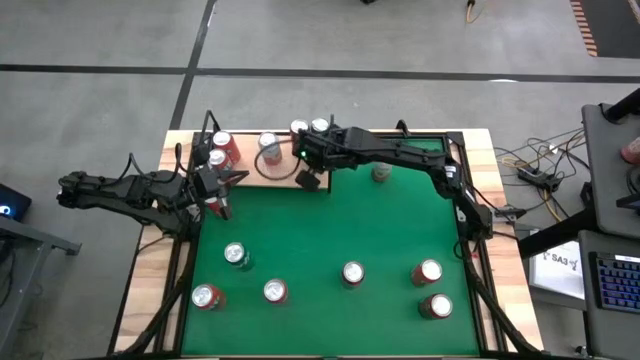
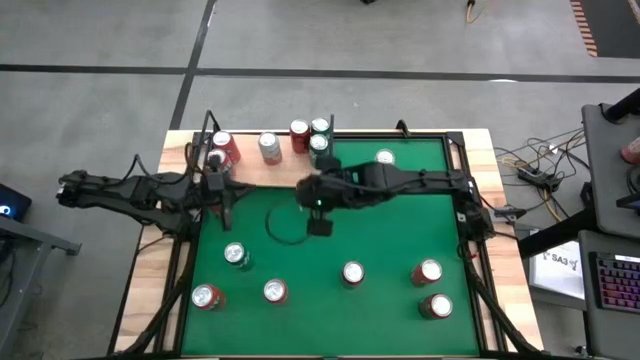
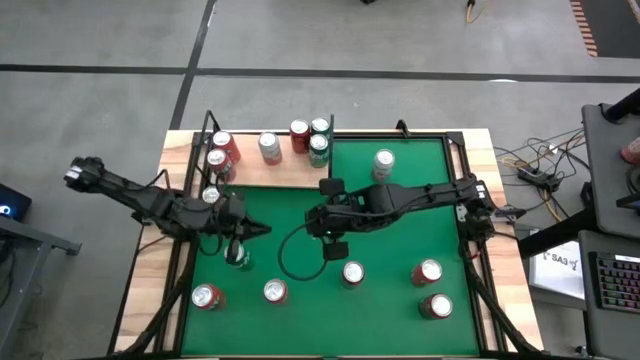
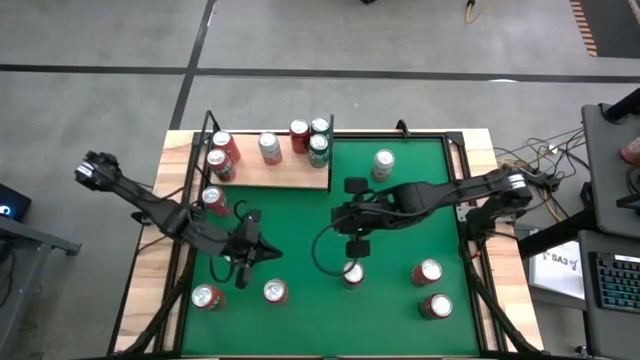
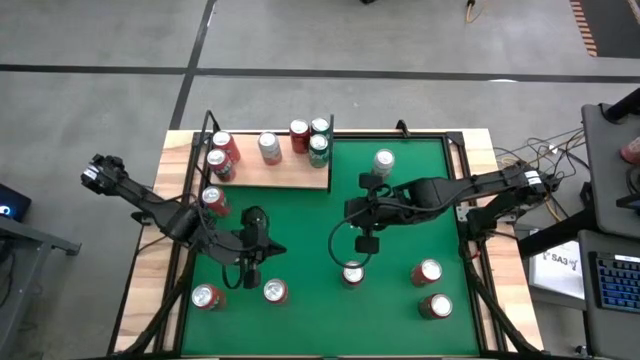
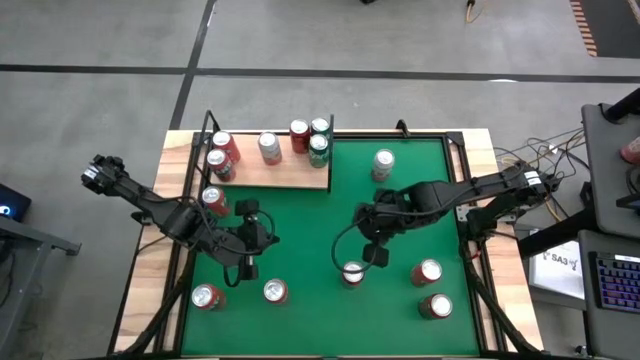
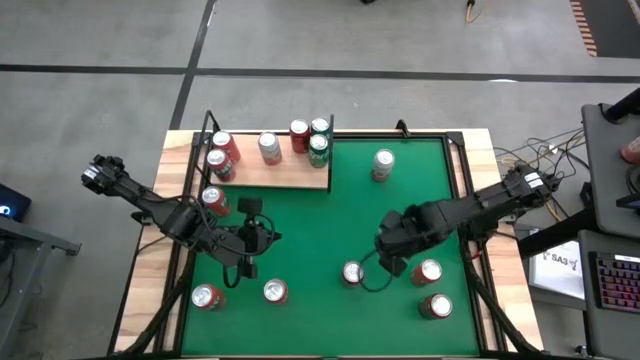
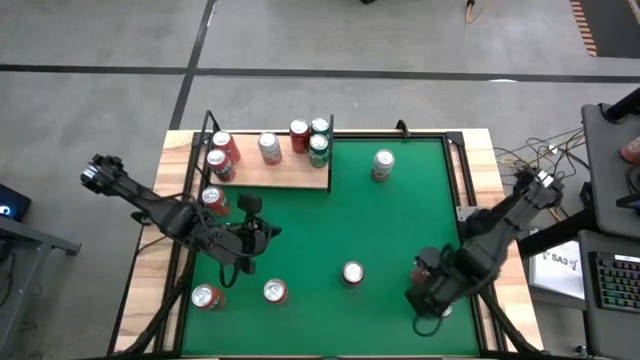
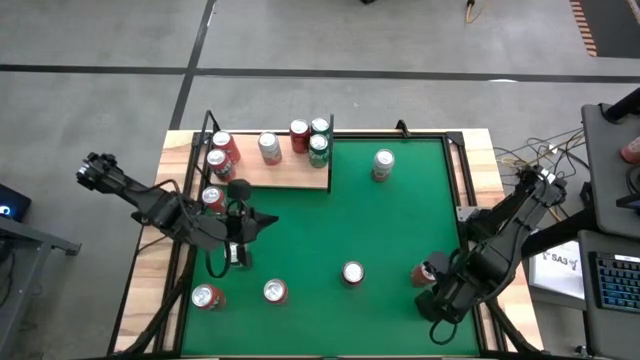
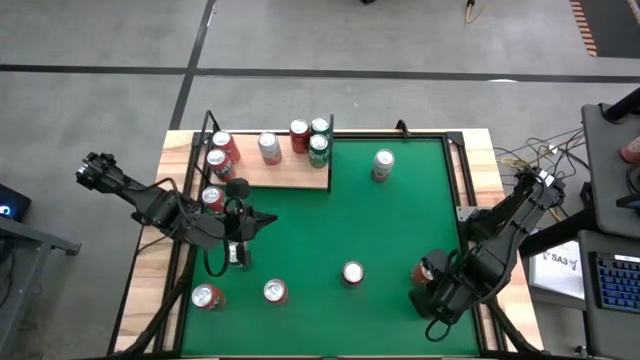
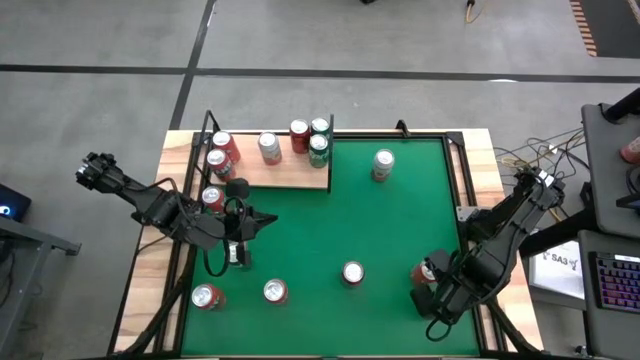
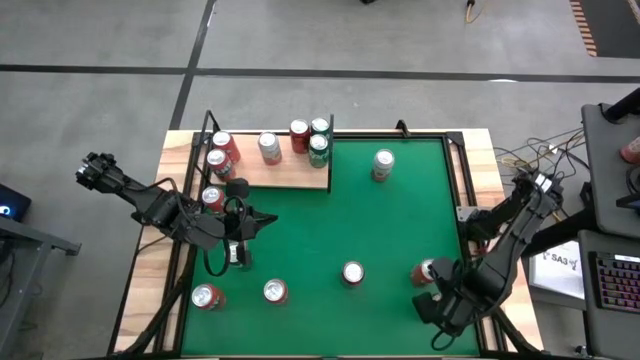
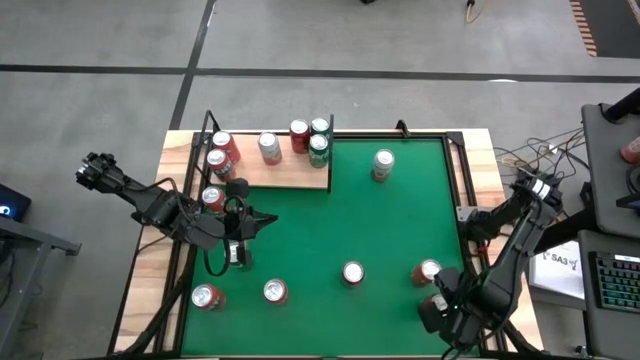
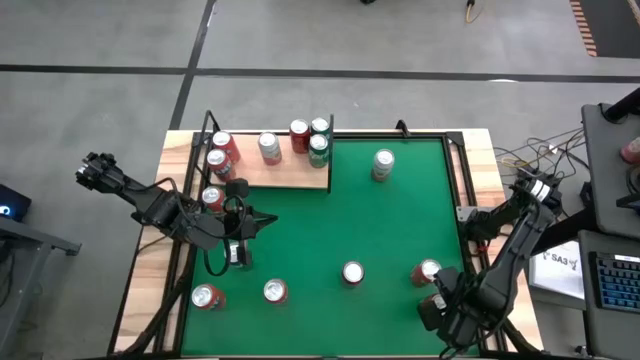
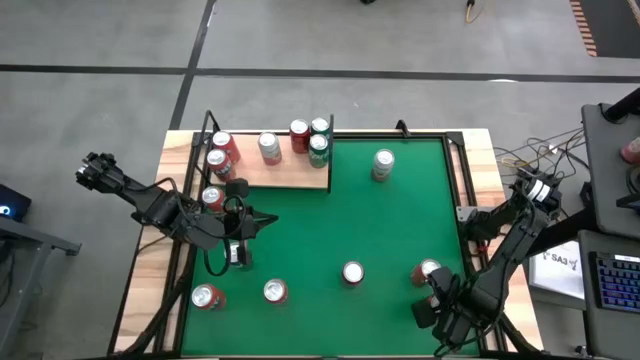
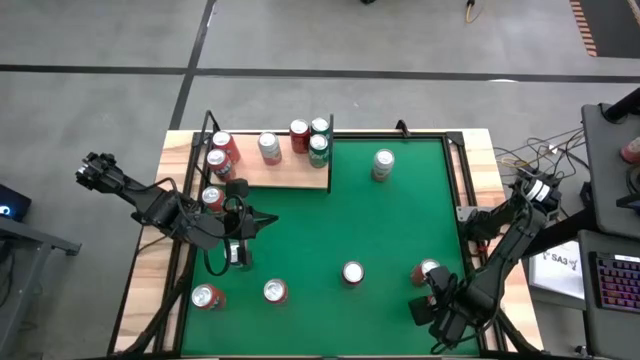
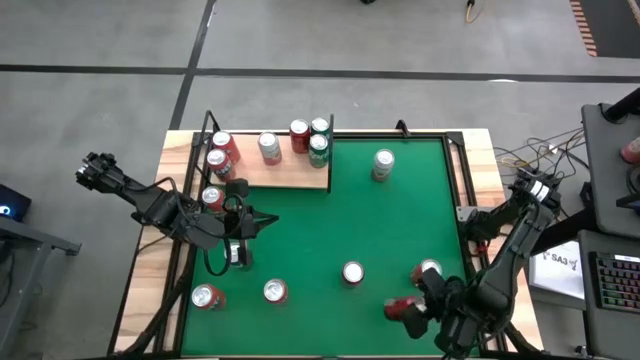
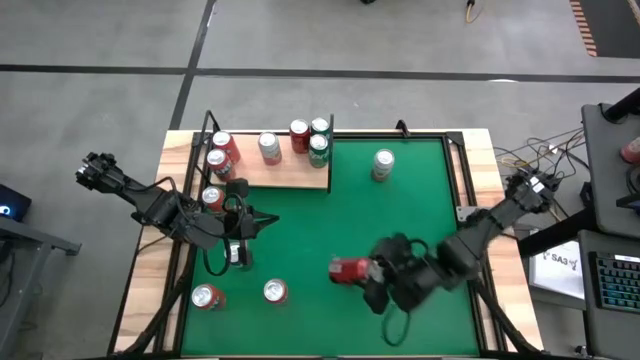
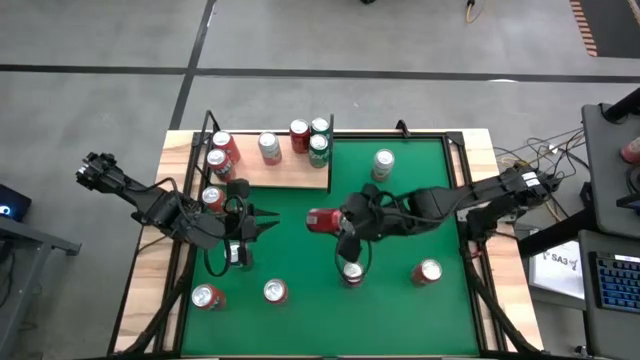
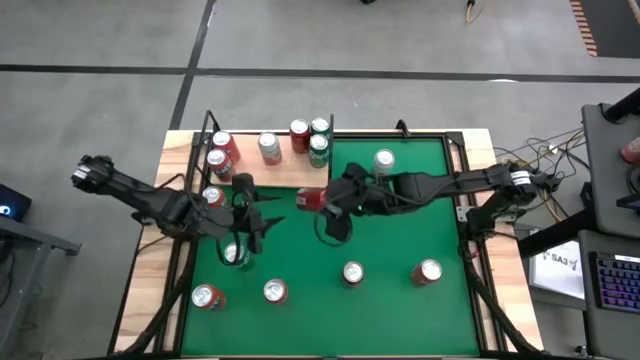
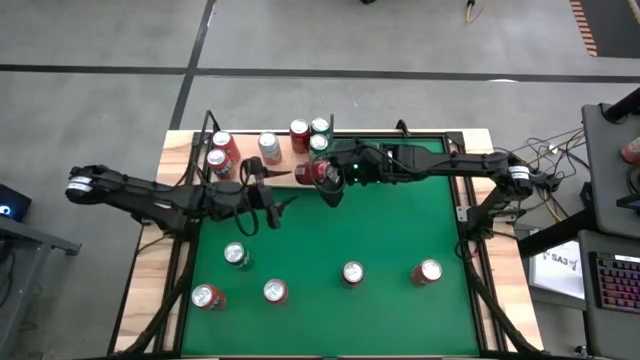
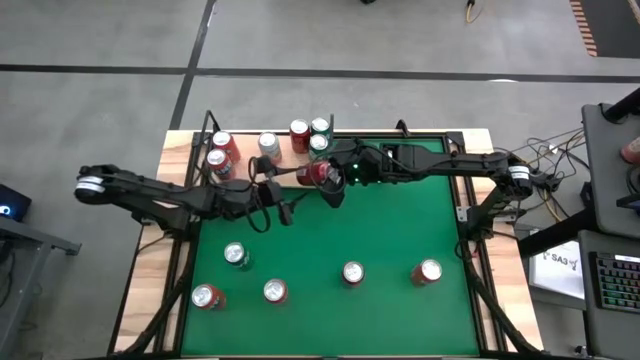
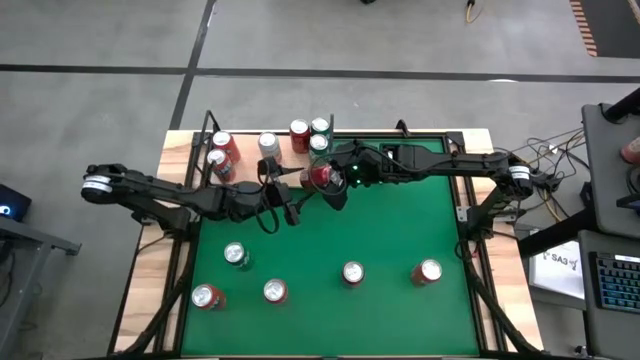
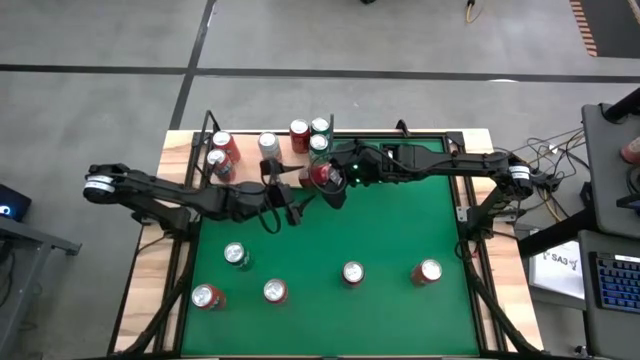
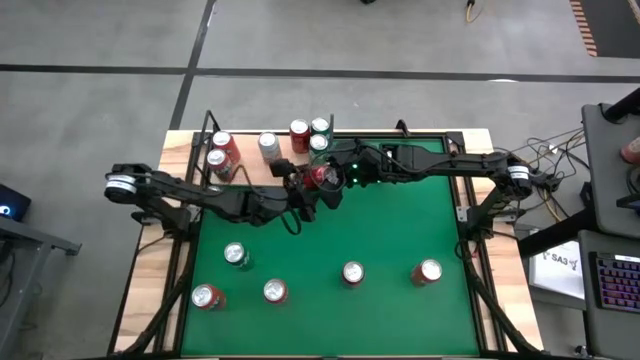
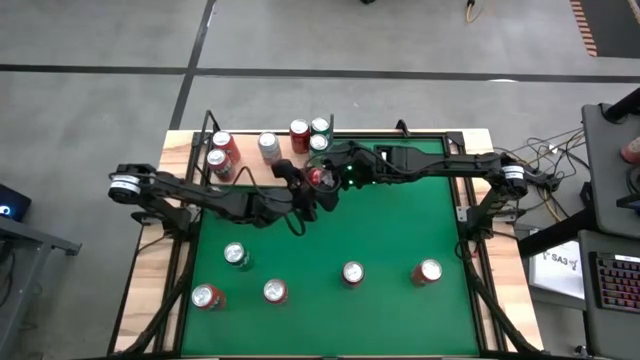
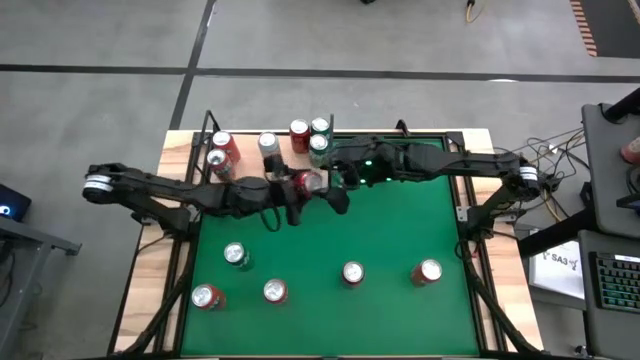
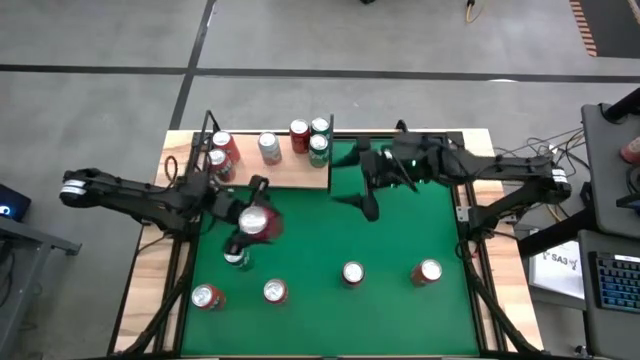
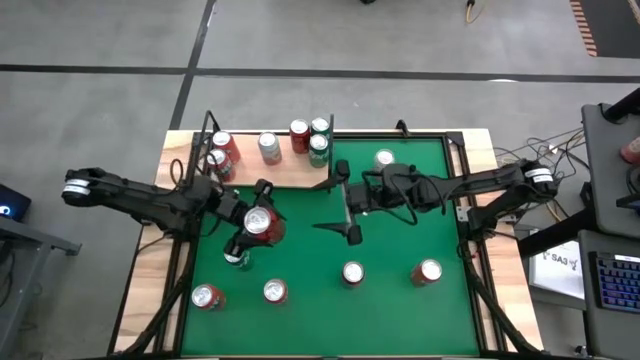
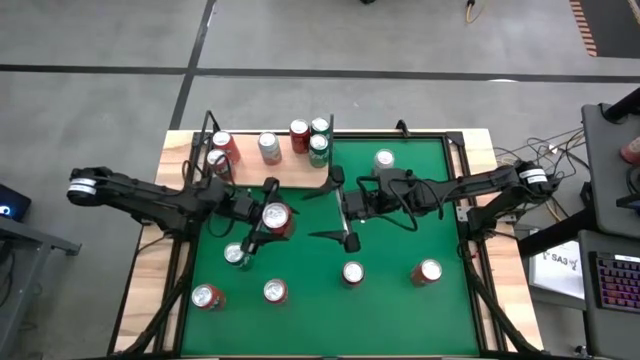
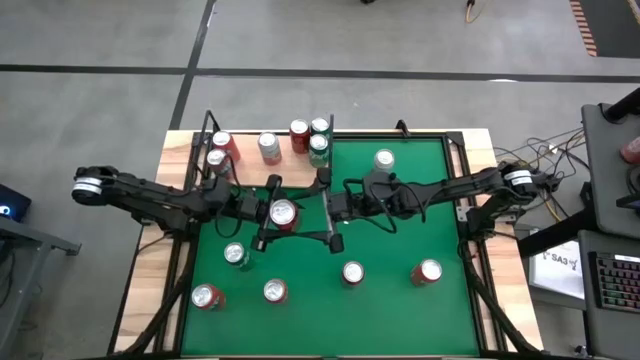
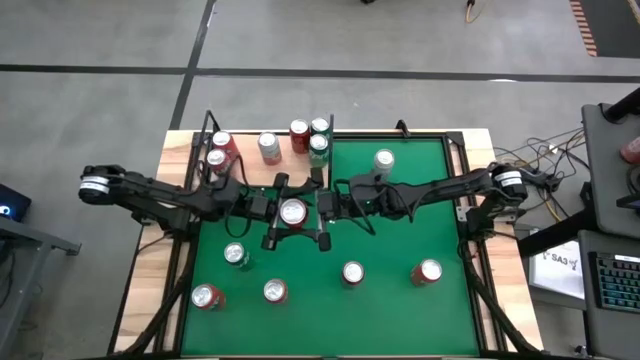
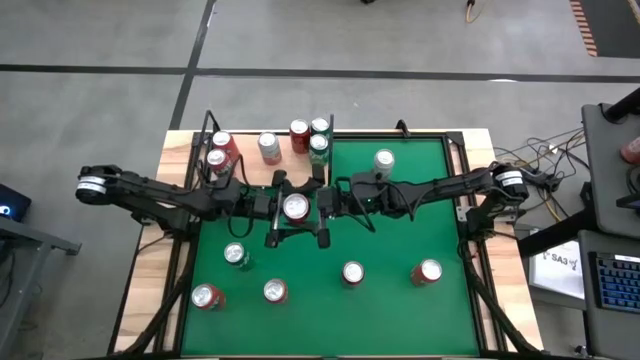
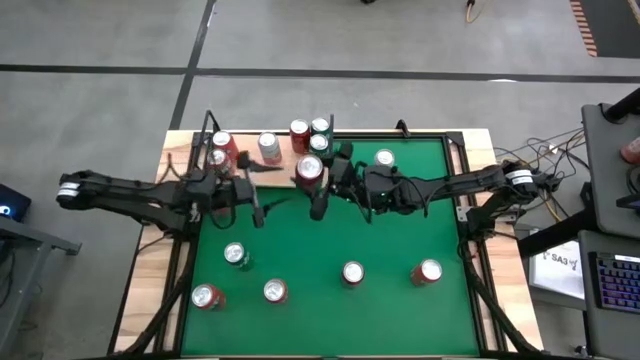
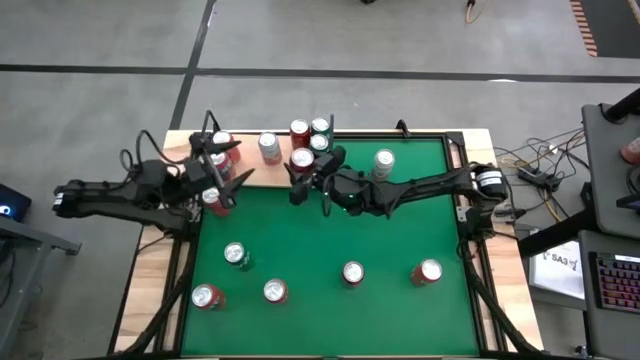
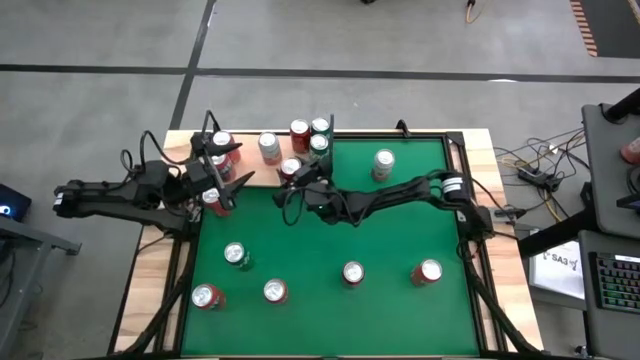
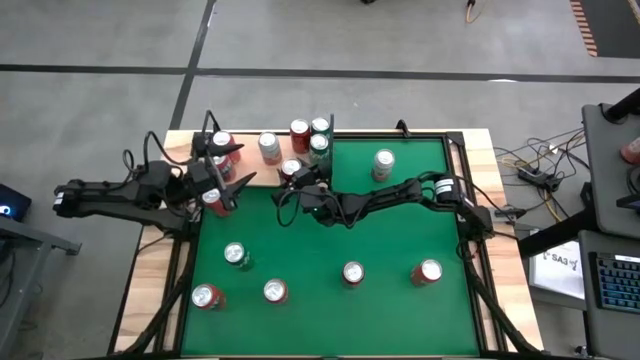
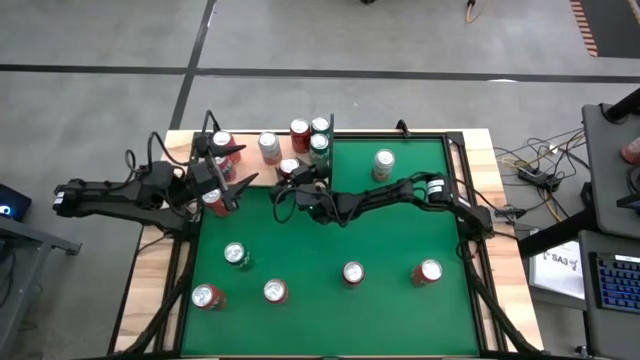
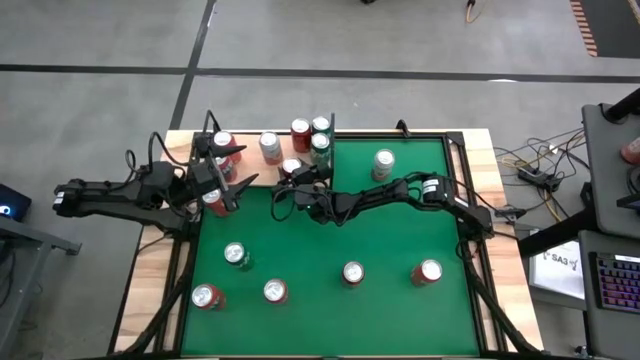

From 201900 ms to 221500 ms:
Task: Place canned beverage on shelf
Put the red-black soda can on the shelf aligned with the other red-black soda can

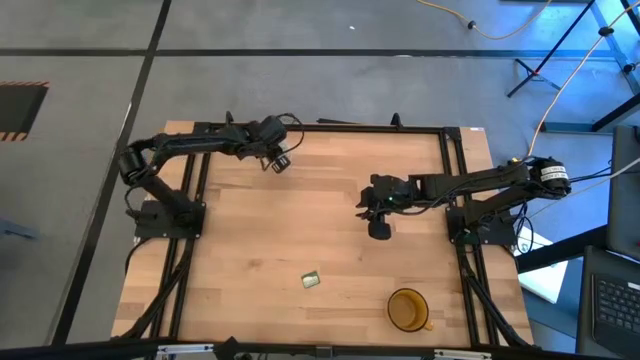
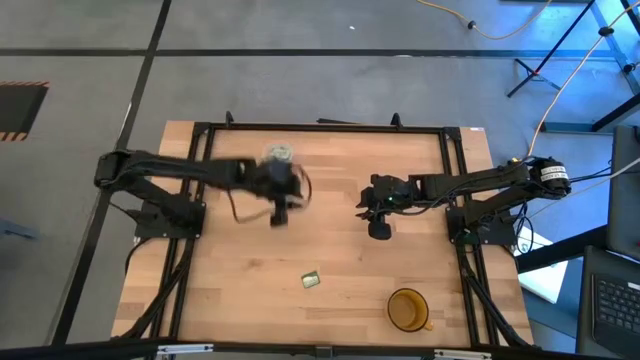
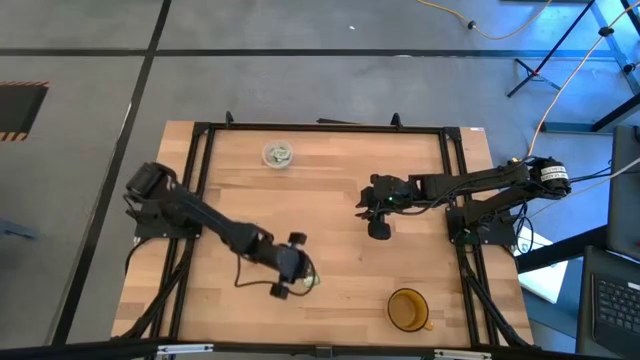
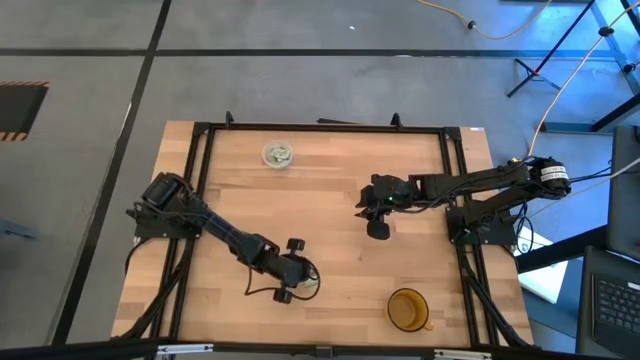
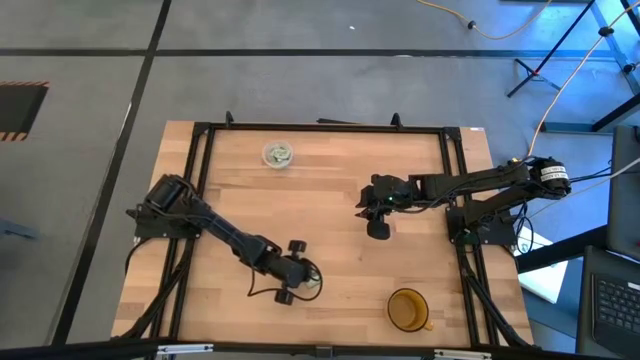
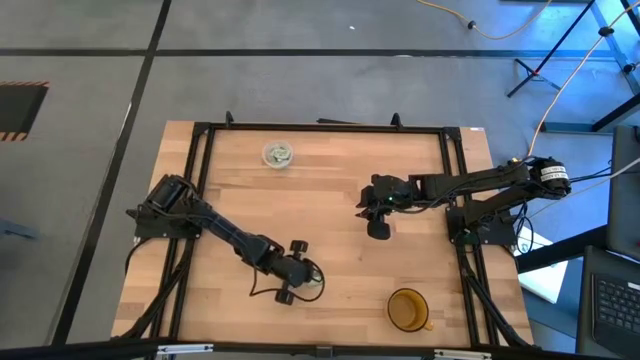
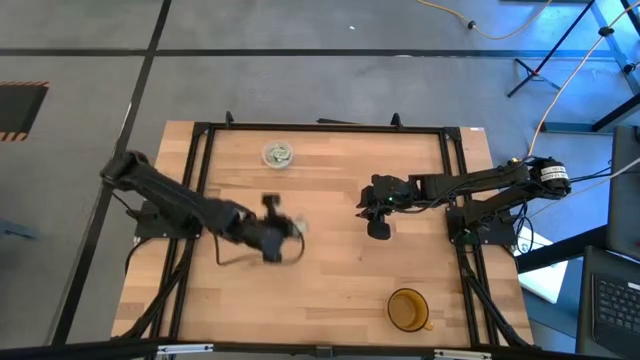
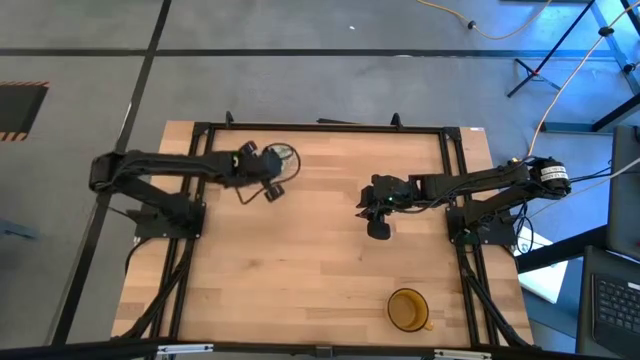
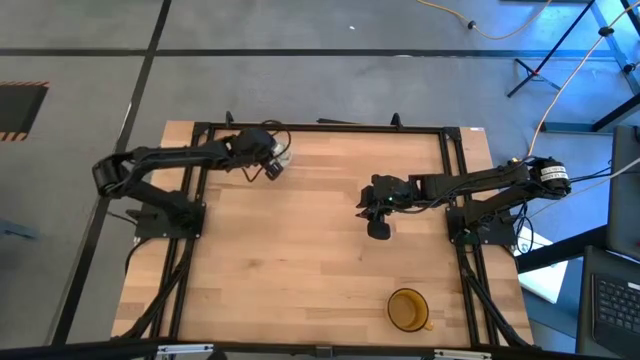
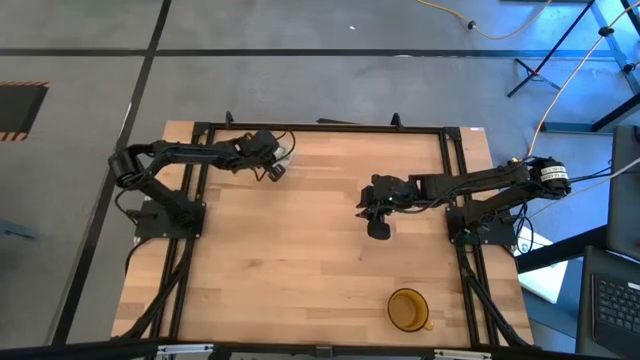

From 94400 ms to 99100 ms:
Task: Pick and place Stevia / Truvia into bins
Put the truvia packet into the transparent container
